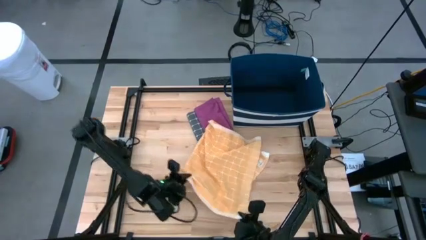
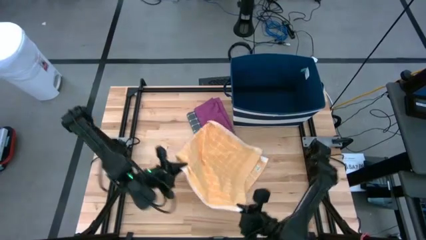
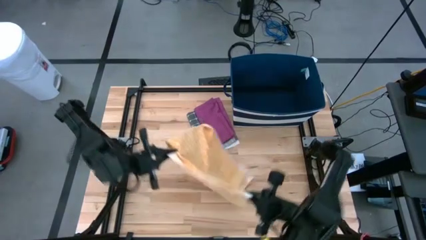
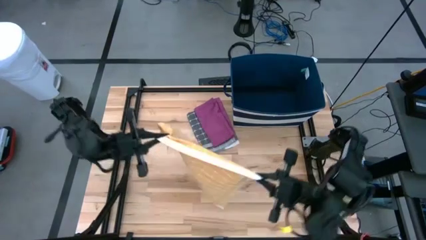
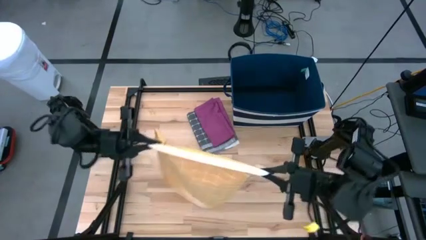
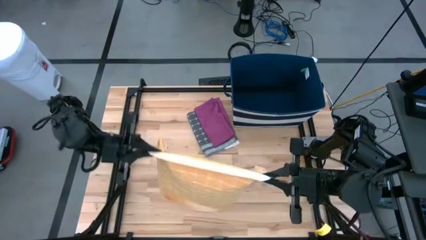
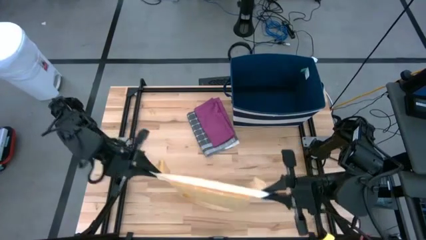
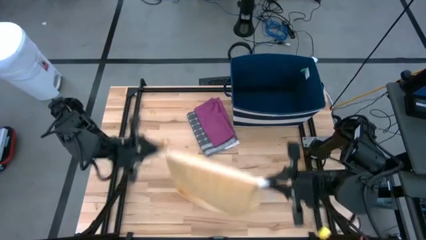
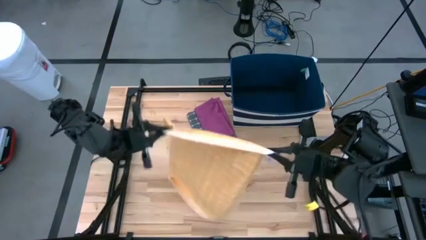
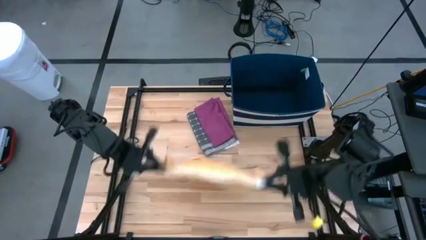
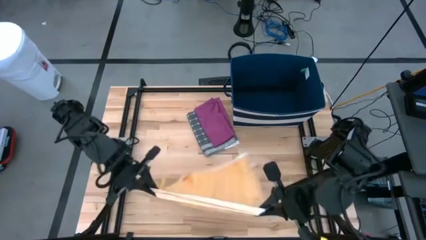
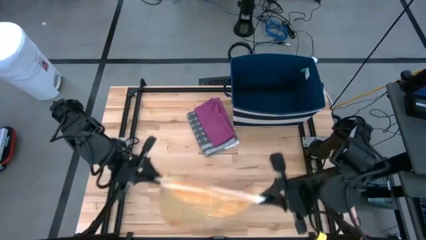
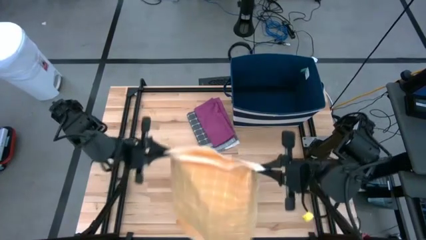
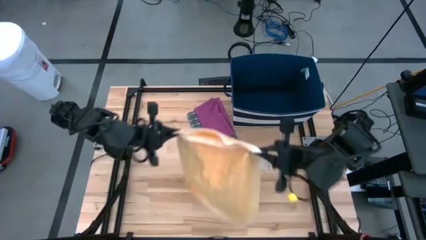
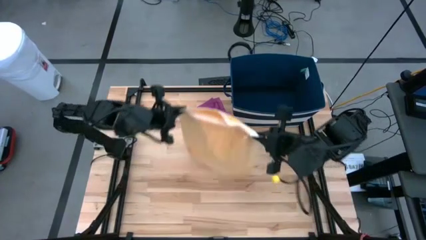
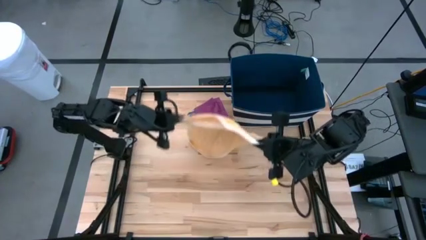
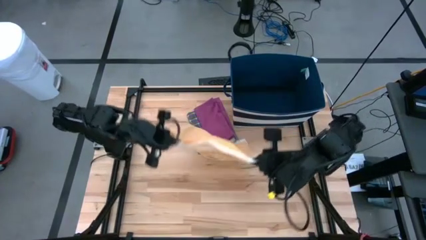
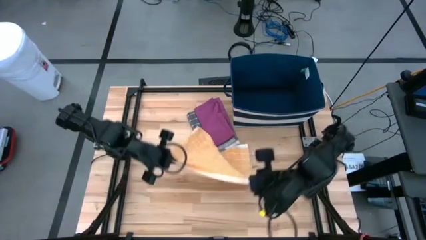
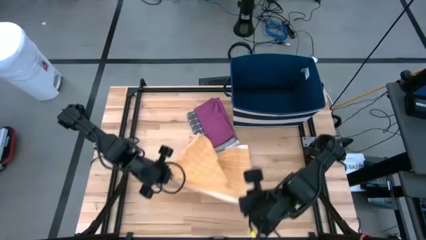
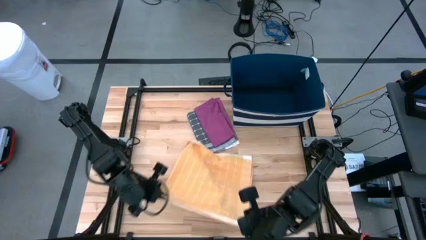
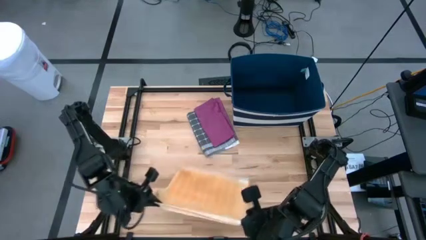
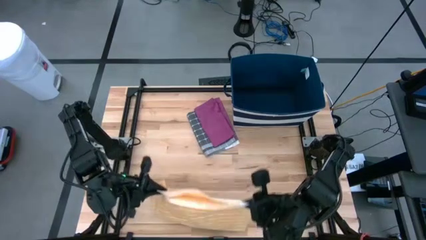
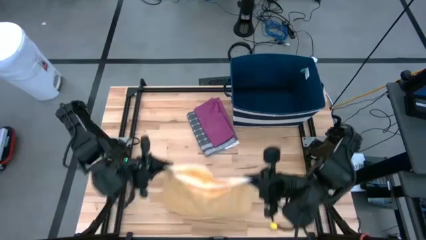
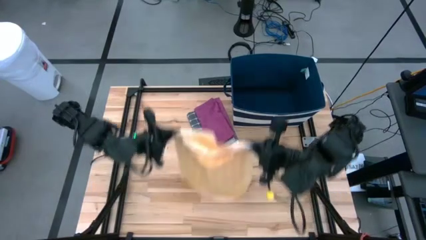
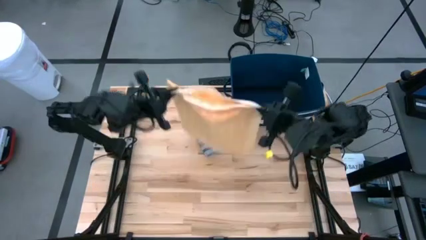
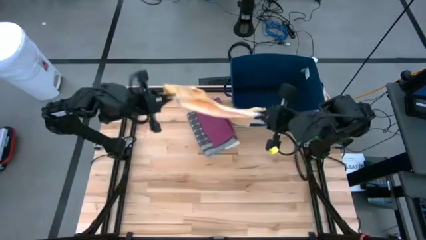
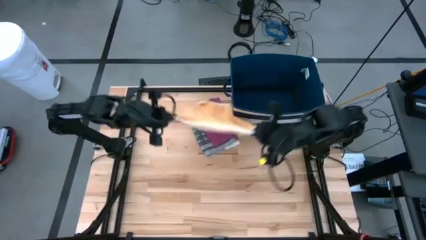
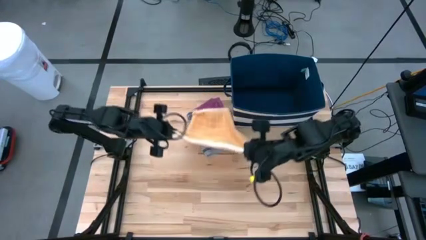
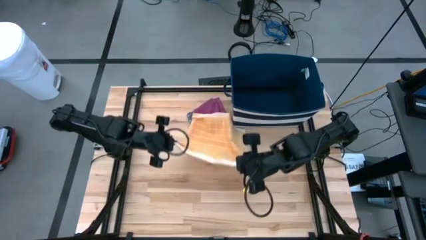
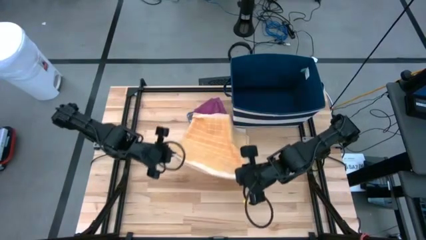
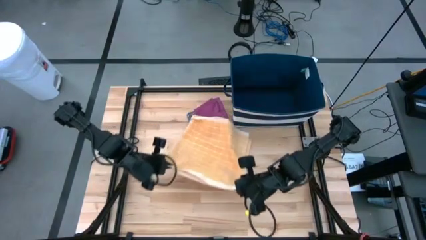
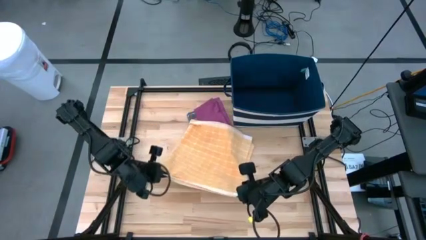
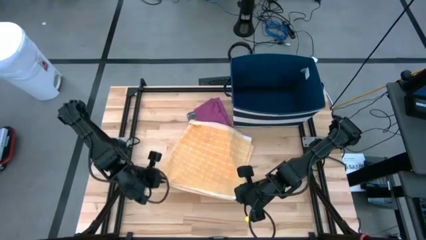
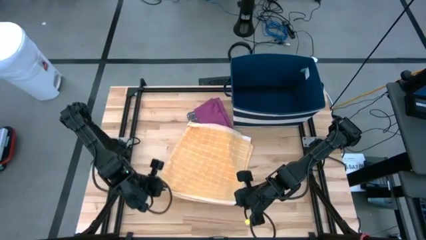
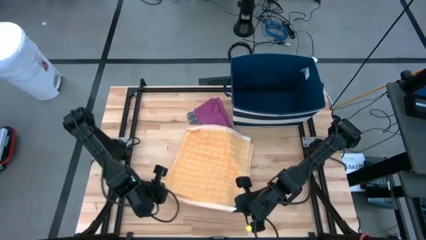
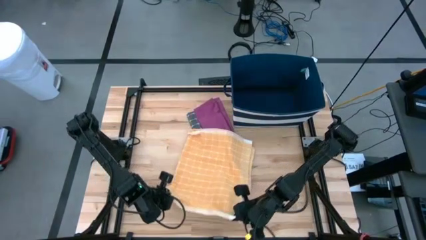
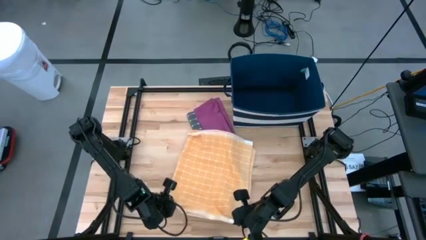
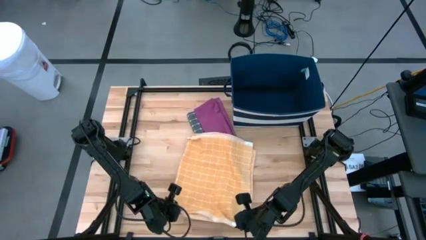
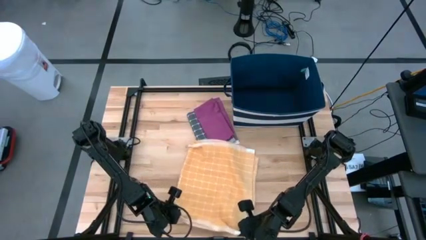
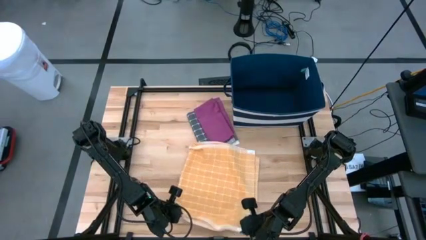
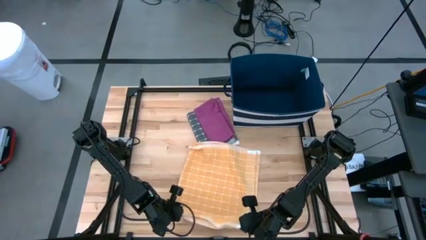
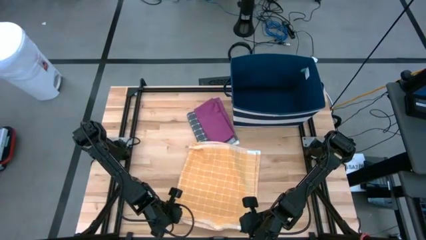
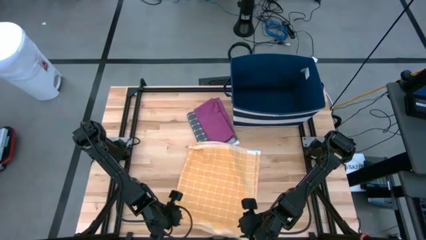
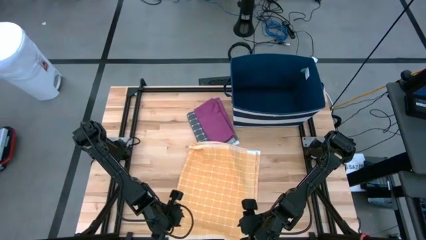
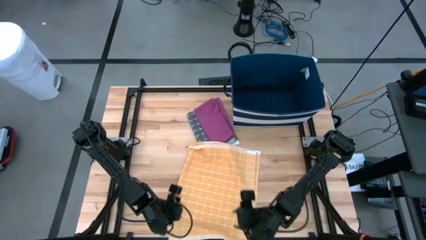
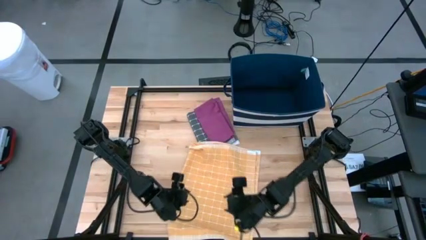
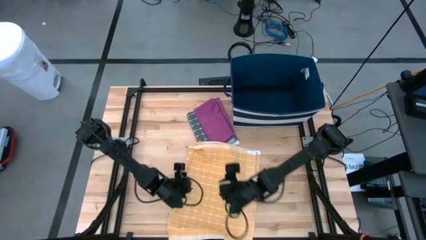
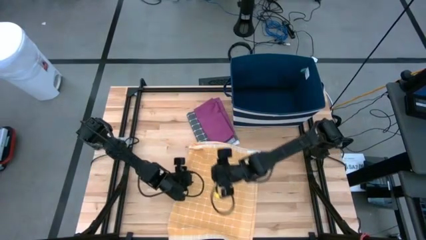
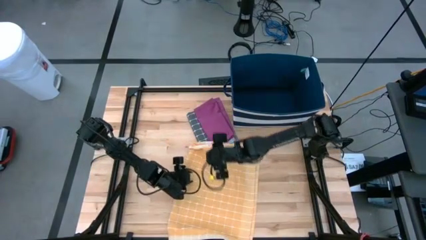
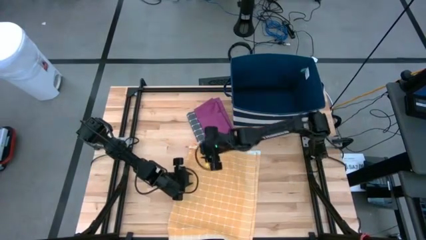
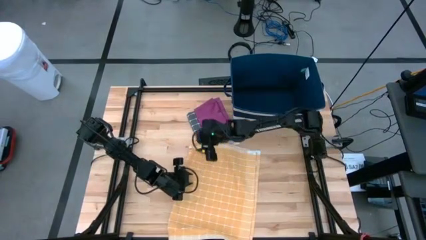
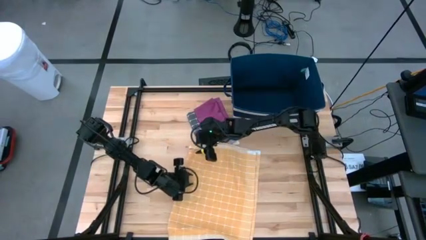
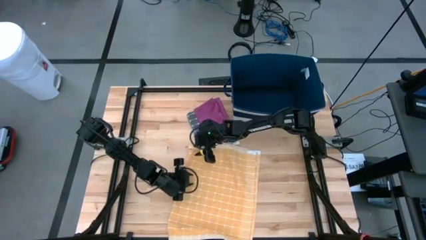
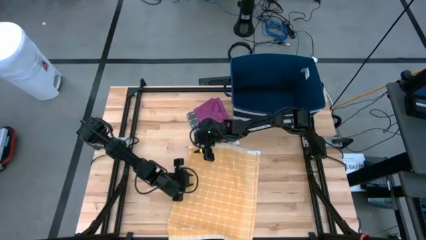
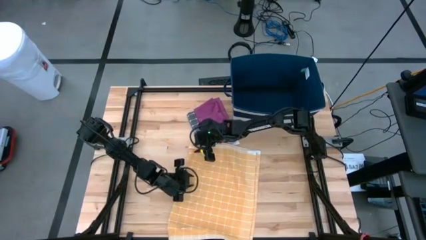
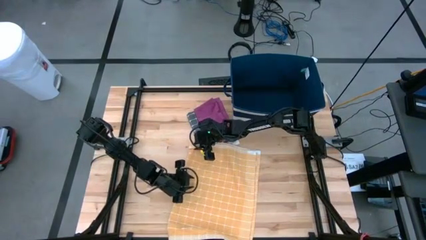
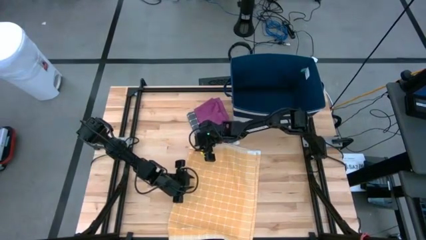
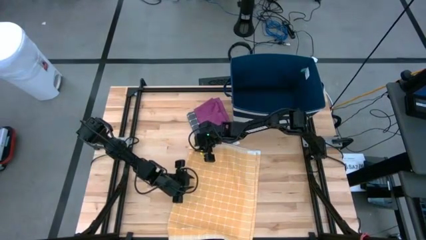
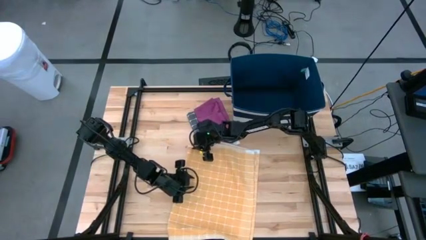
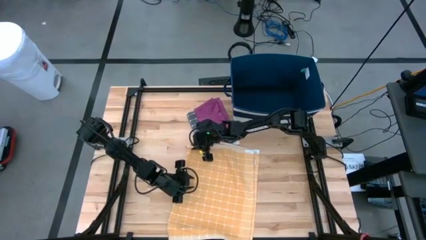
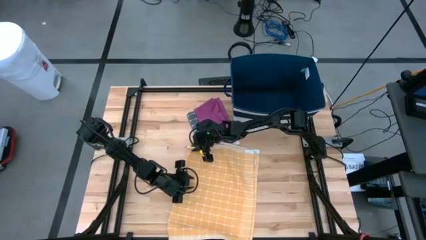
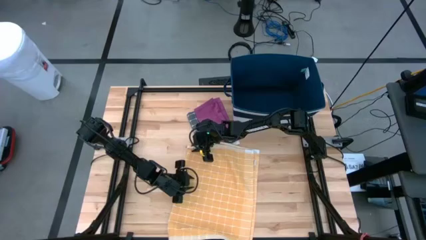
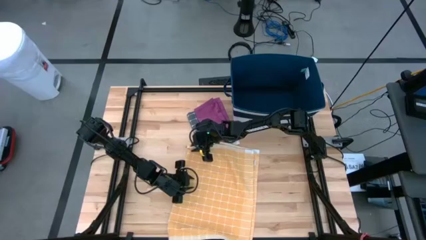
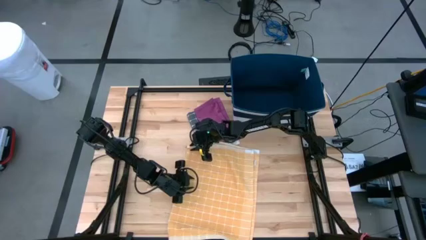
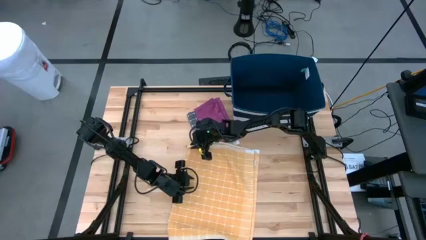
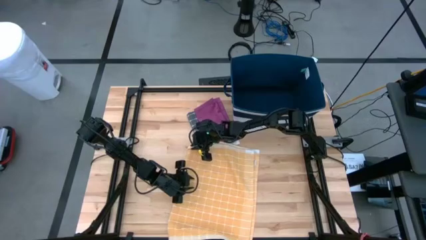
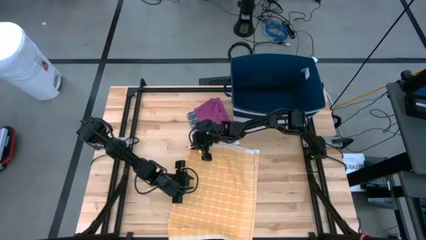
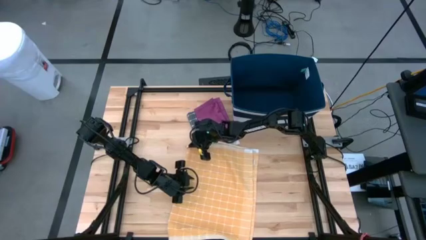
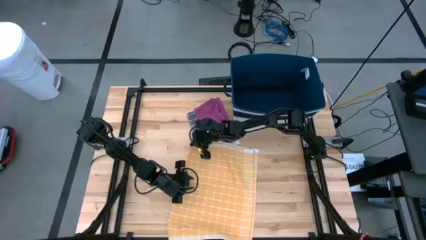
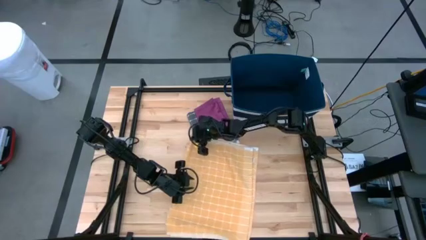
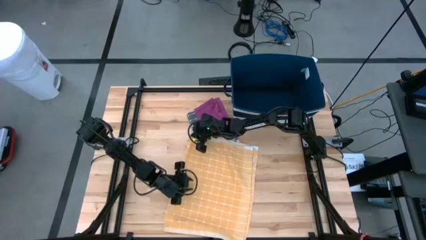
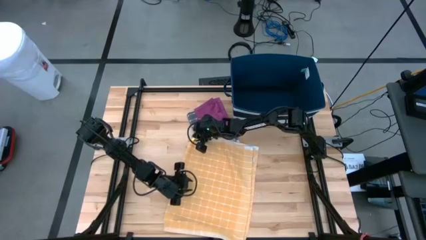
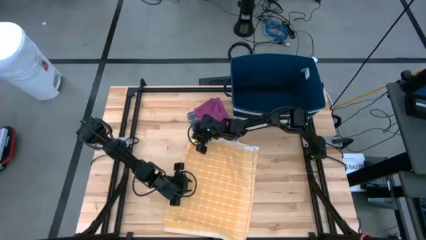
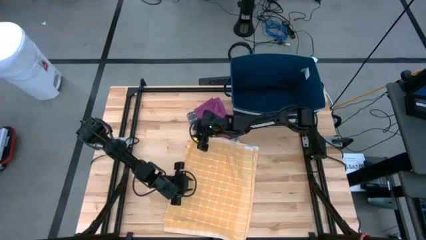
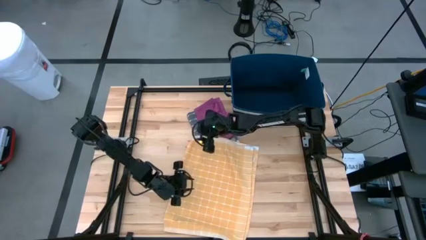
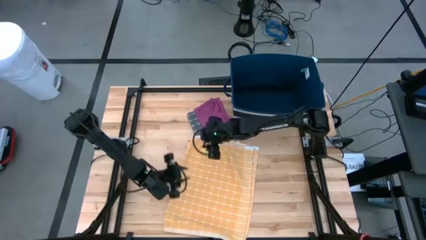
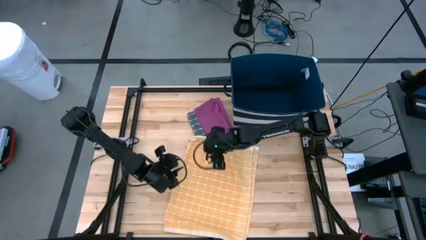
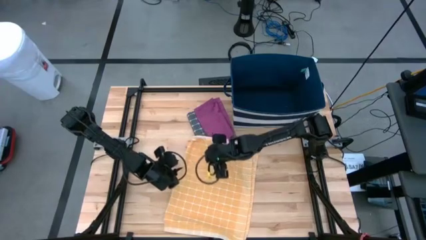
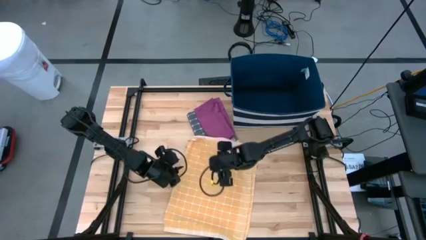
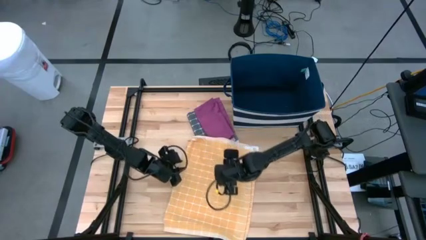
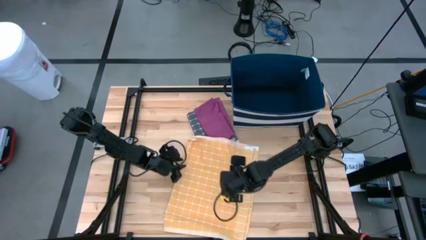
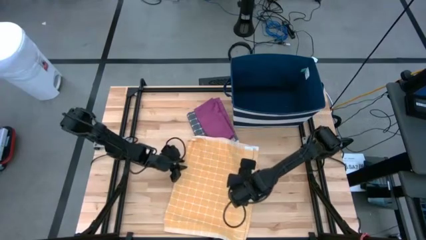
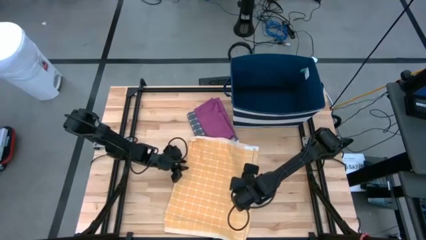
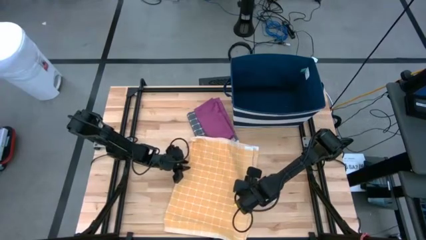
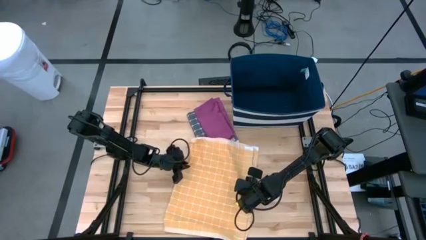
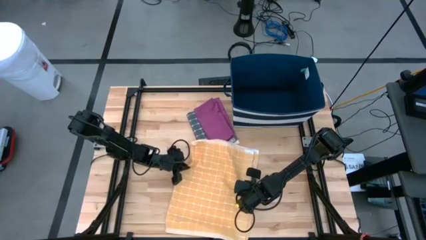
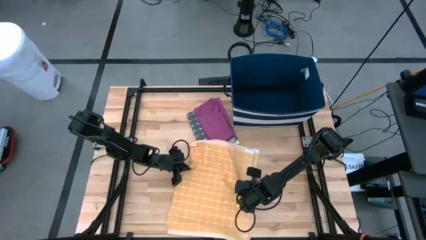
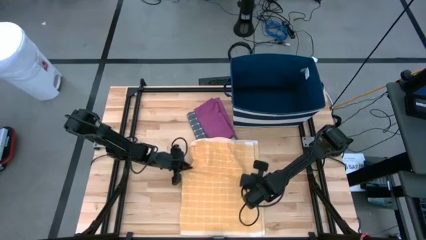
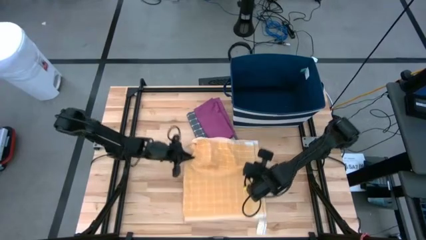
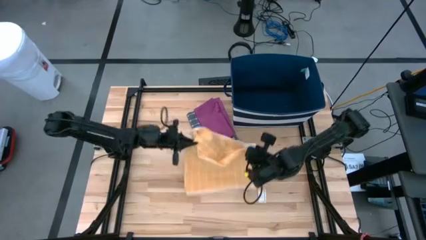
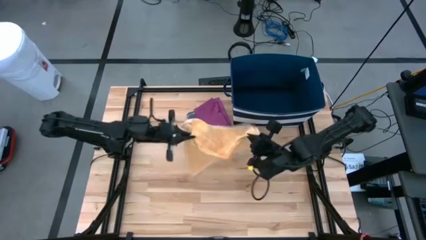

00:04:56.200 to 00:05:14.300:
Task: Fold towel
Fold the orange checkered towel
